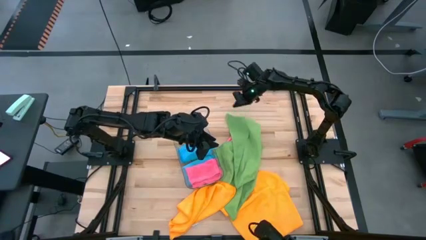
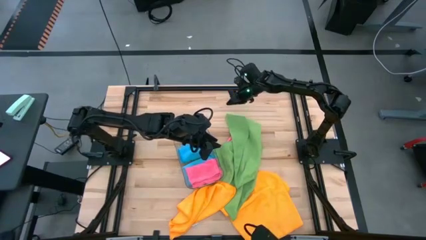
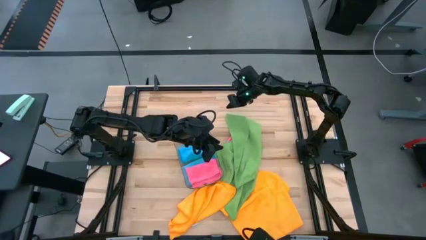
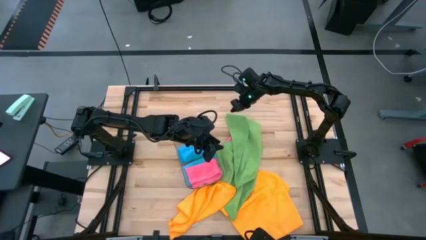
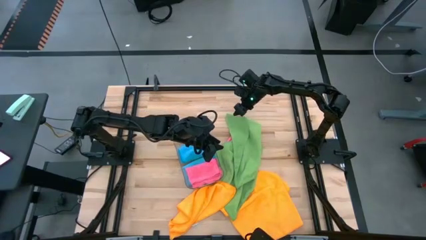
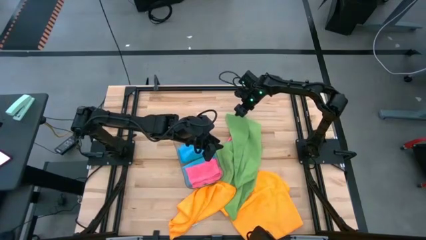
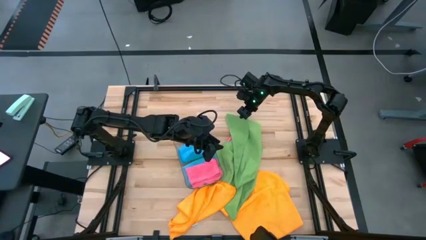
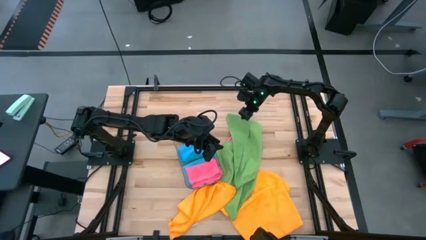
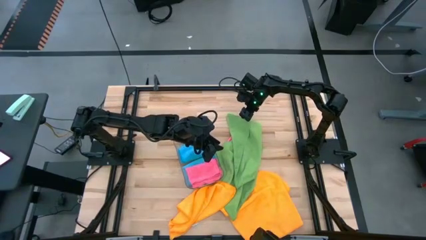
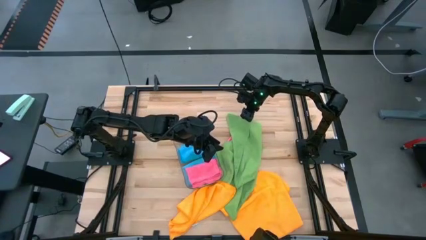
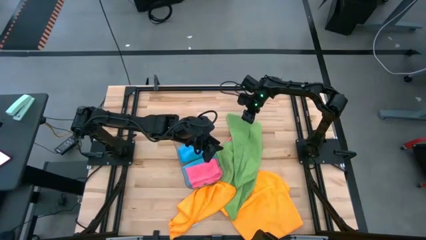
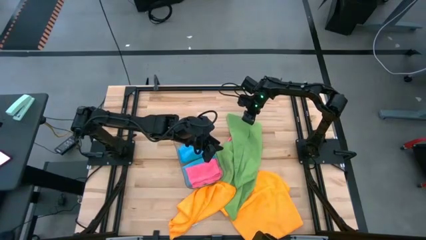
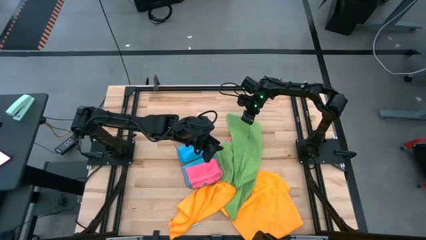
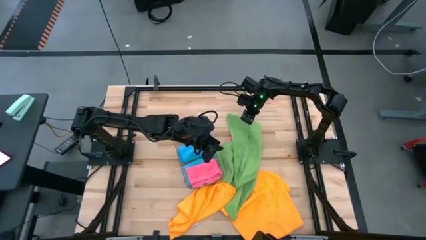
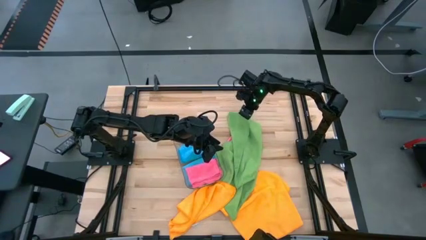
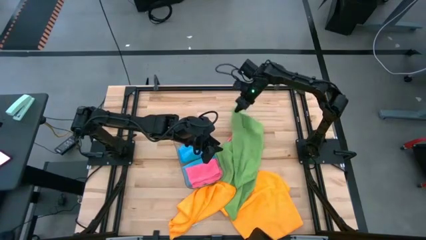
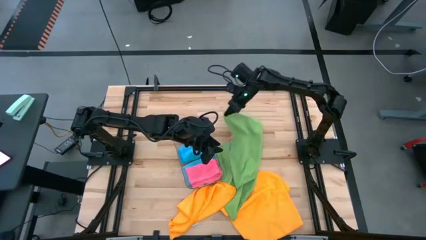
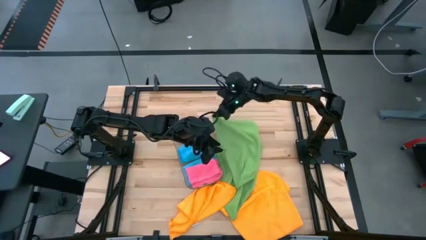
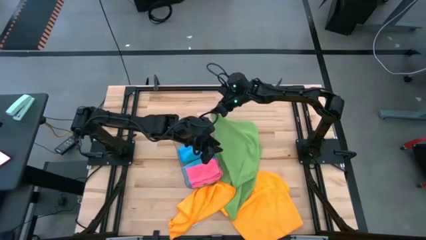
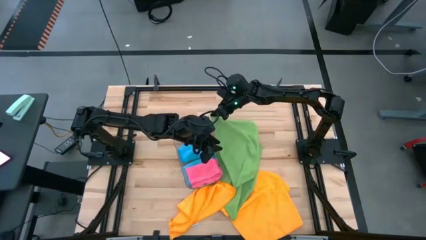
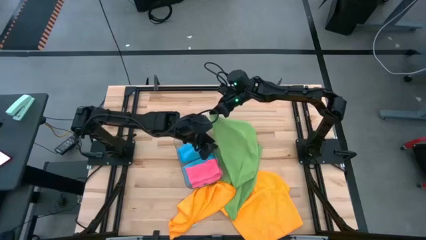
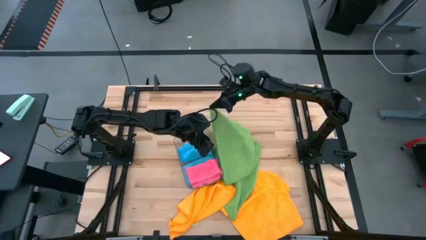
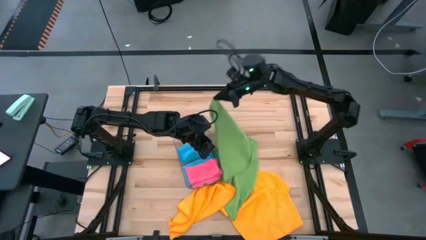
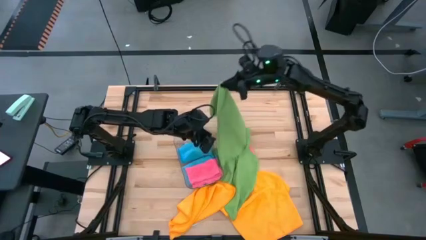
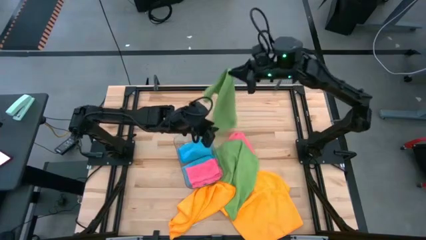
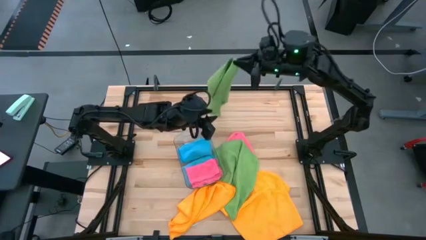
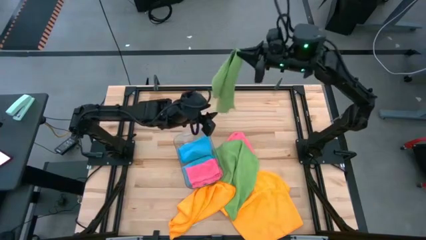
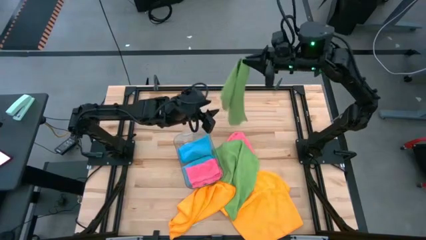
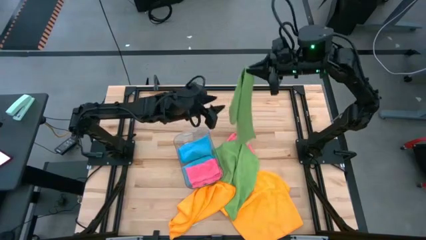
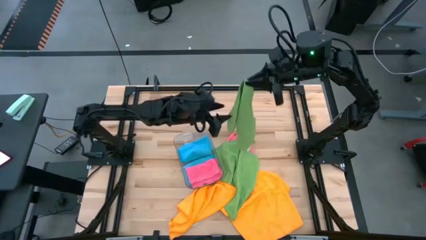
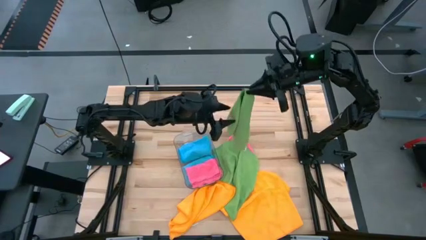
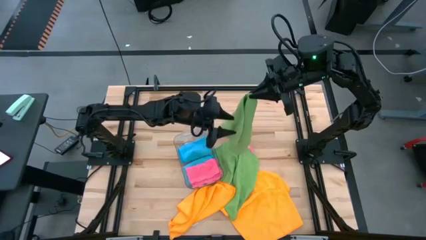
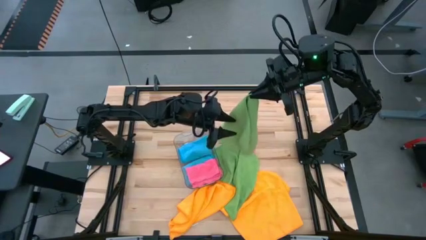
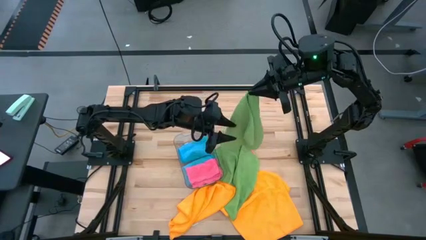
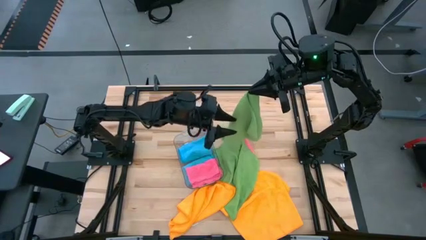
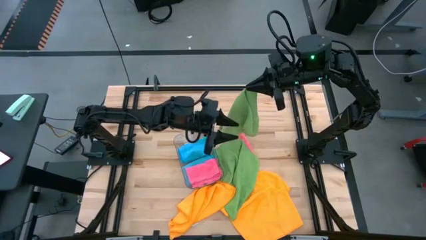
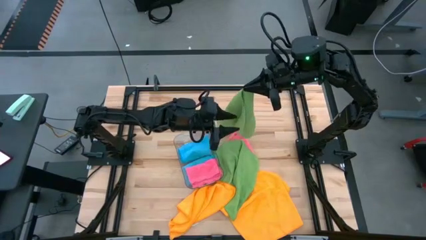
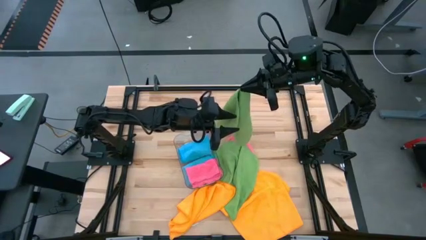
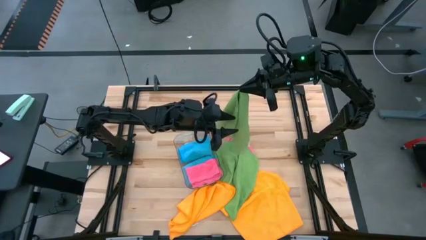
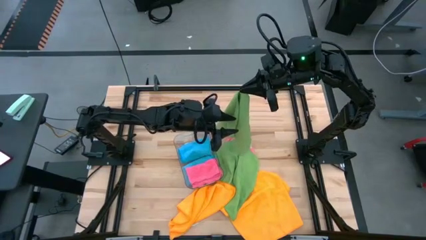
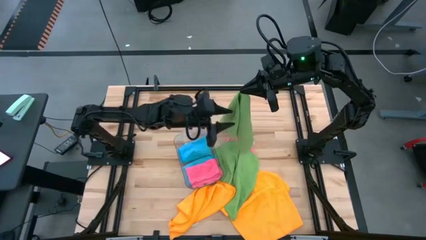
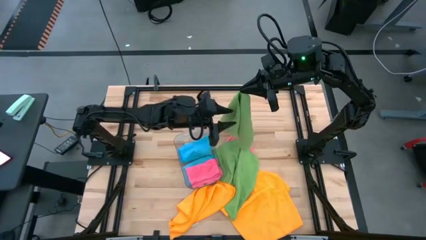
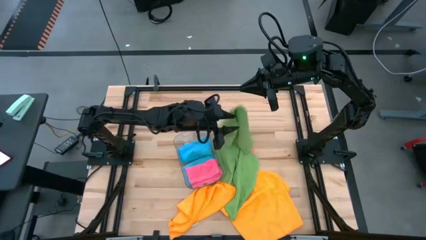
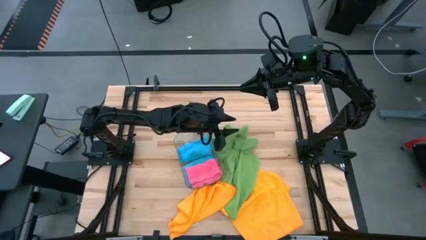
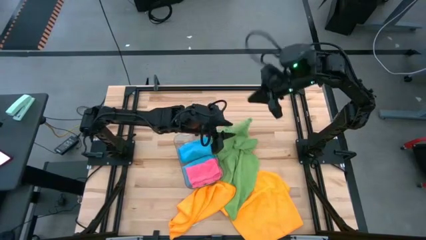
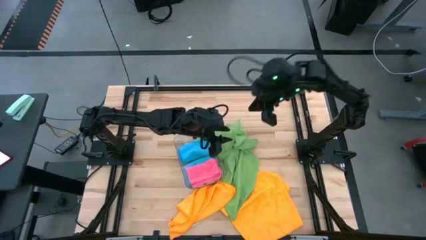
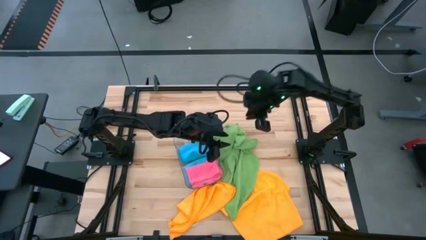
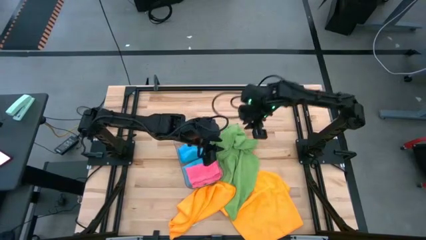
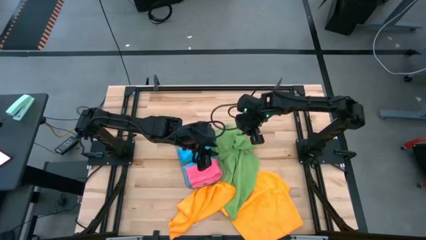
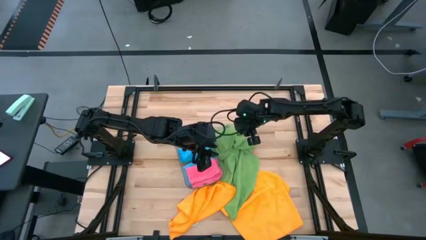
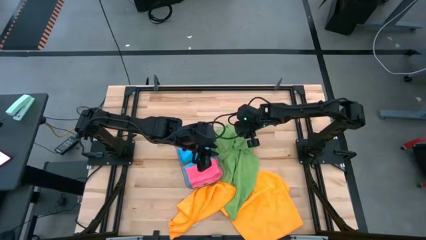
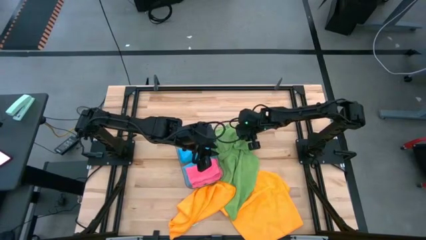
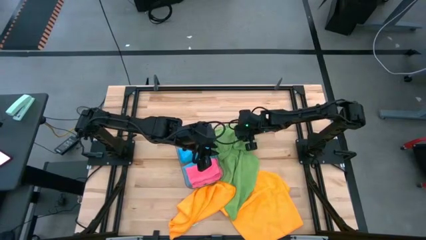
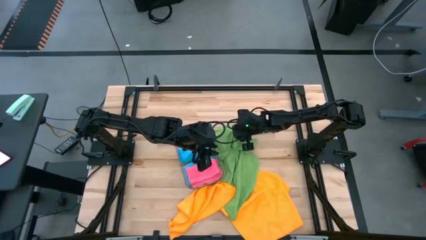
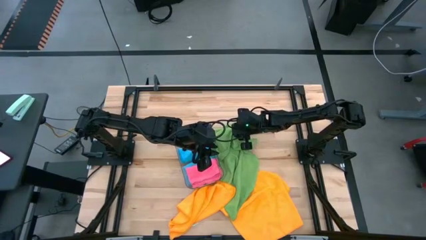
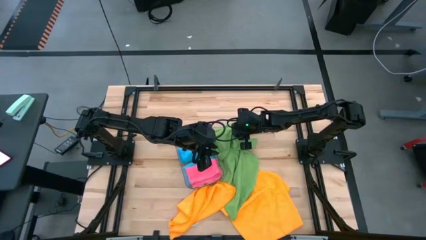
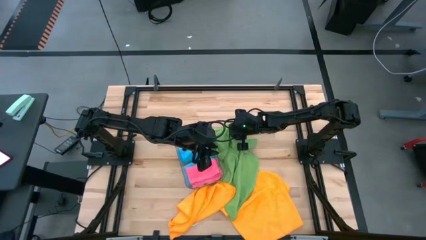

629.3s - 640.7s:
Task: Fold microfiber towels
Fold the top green towel
